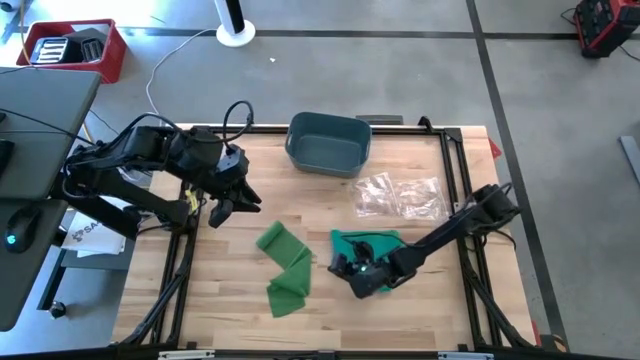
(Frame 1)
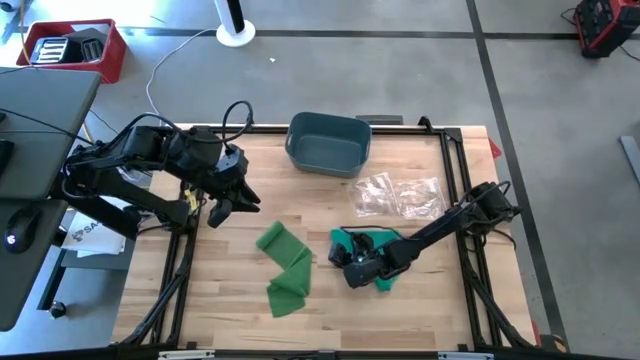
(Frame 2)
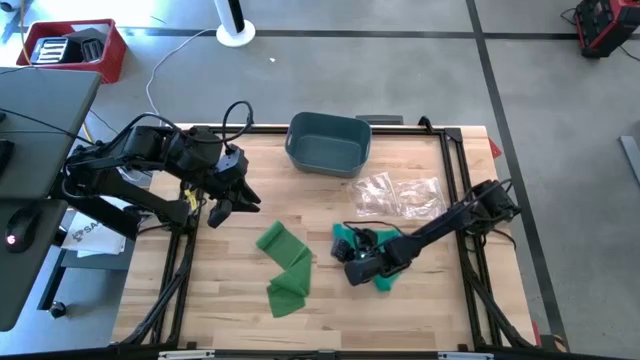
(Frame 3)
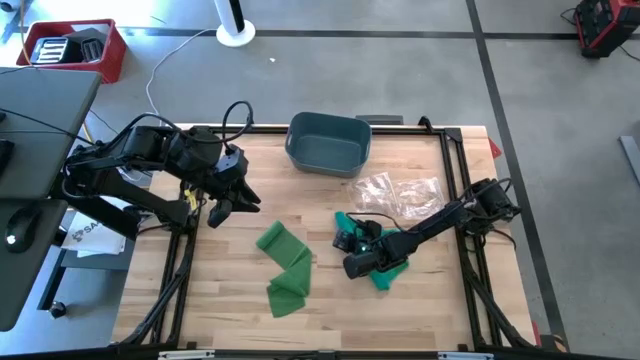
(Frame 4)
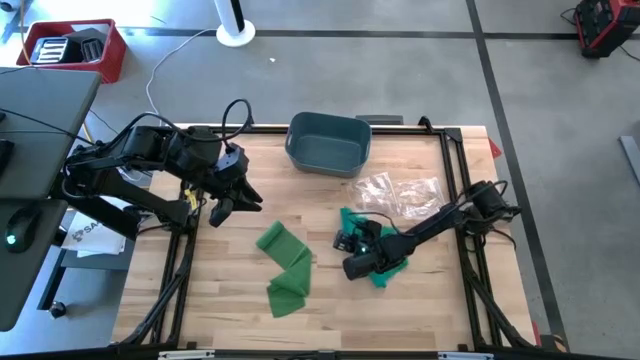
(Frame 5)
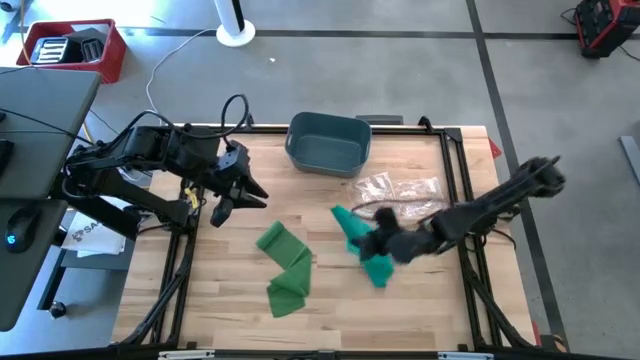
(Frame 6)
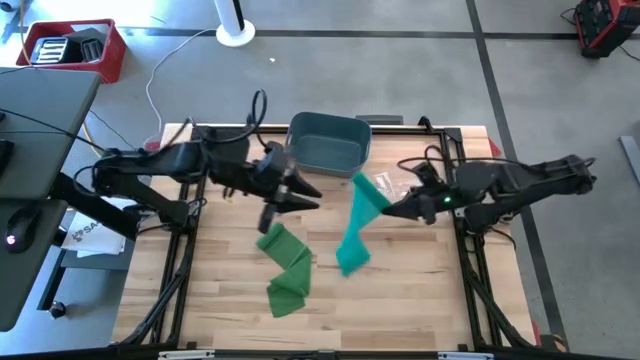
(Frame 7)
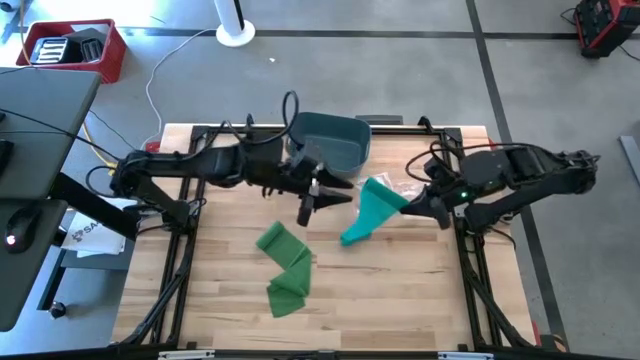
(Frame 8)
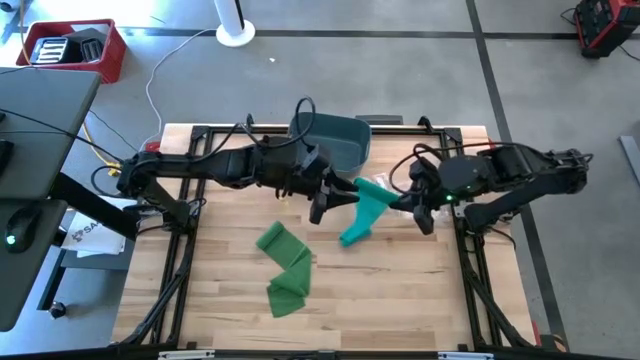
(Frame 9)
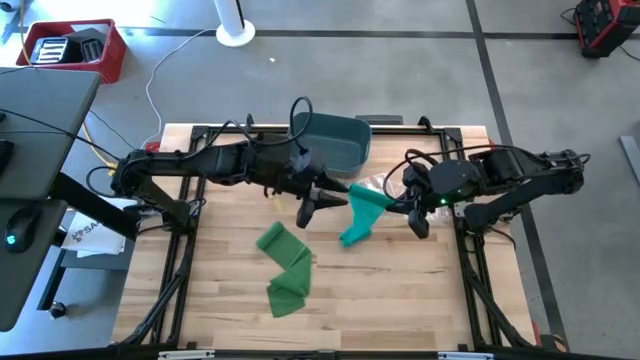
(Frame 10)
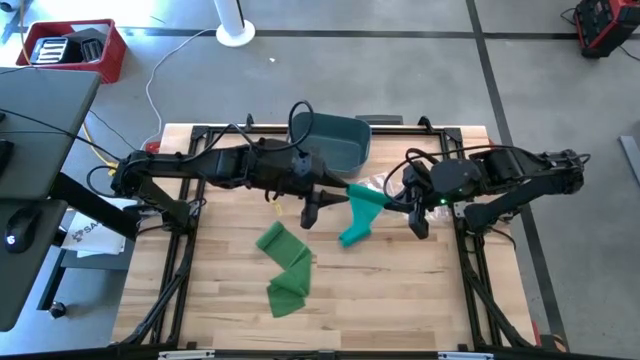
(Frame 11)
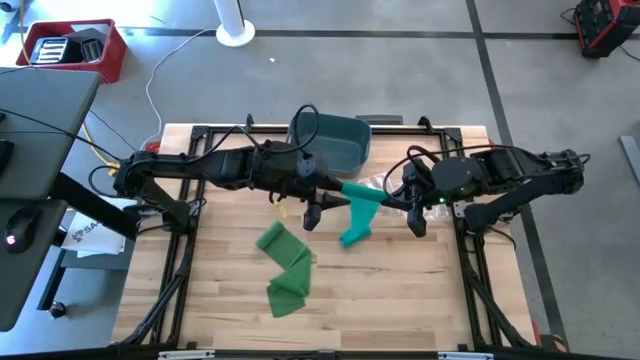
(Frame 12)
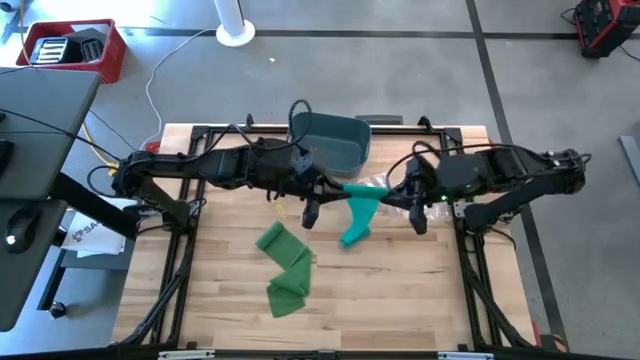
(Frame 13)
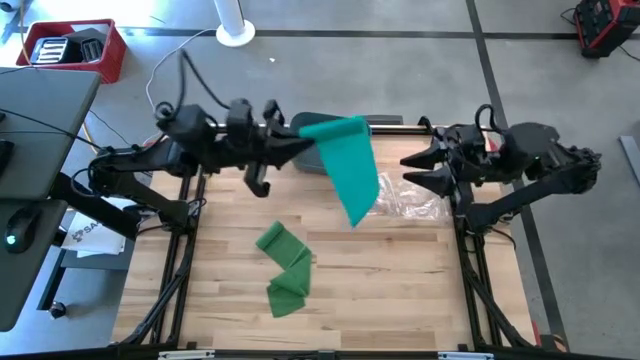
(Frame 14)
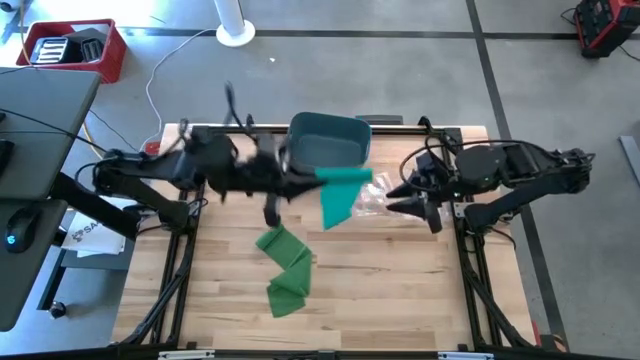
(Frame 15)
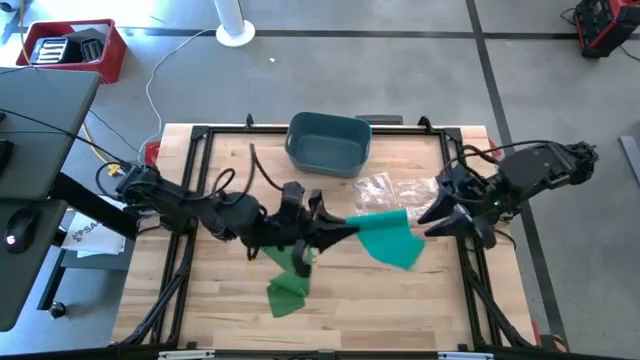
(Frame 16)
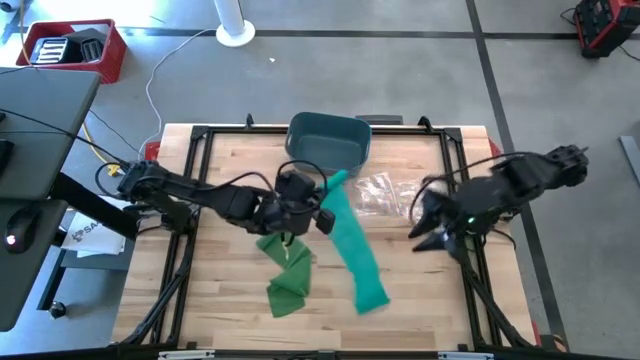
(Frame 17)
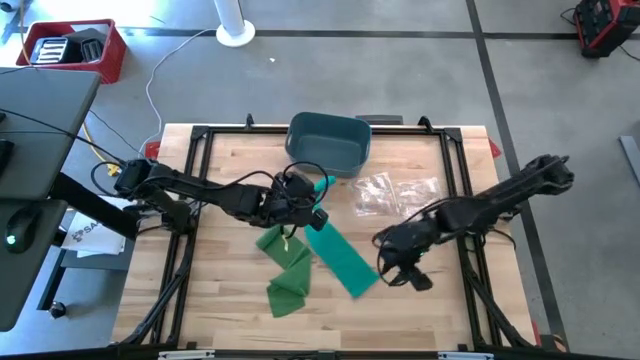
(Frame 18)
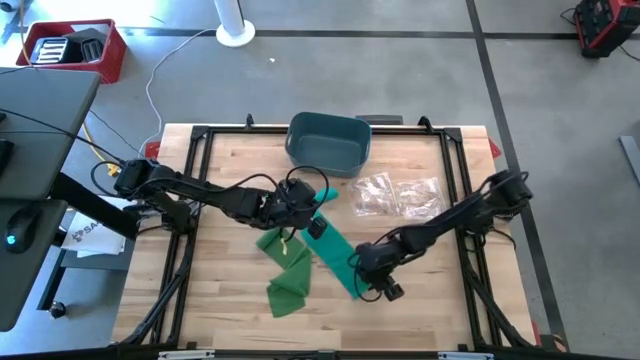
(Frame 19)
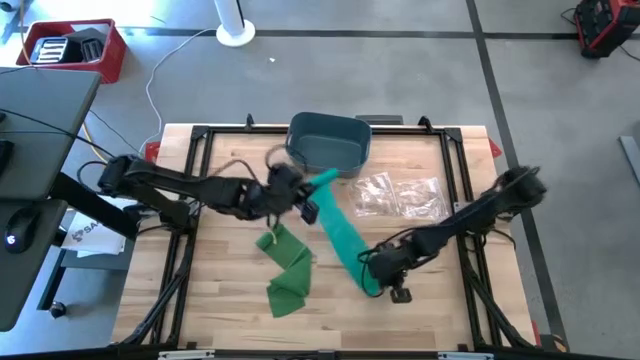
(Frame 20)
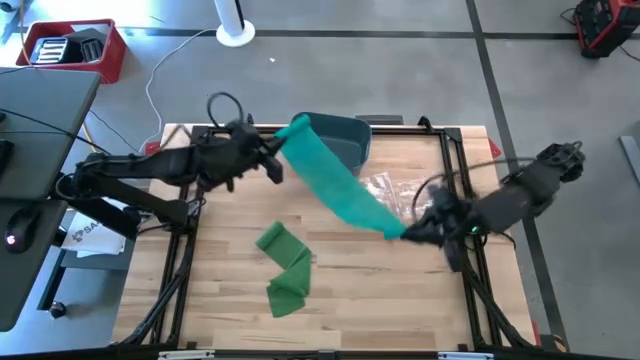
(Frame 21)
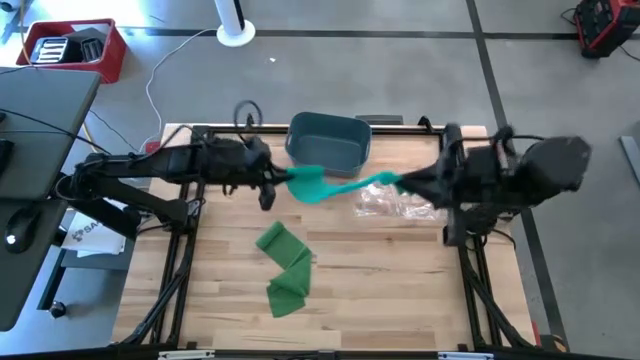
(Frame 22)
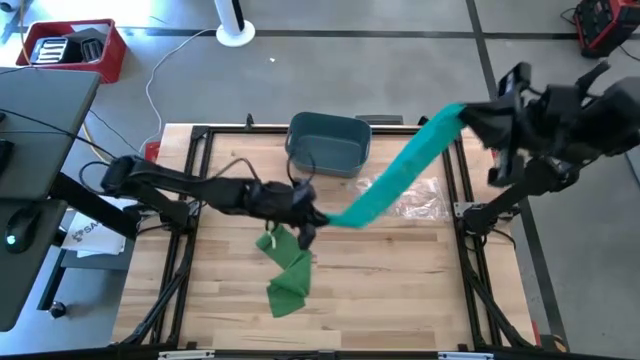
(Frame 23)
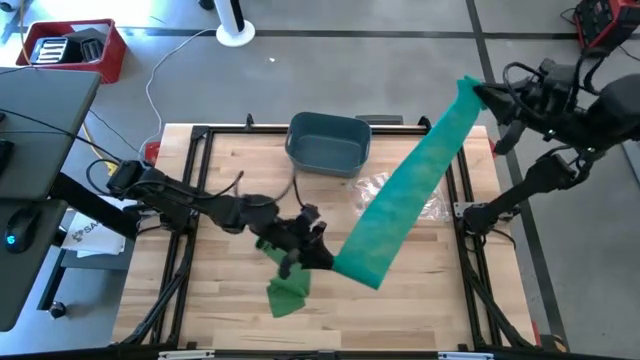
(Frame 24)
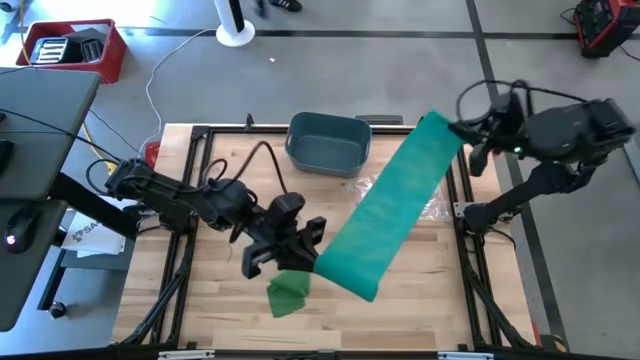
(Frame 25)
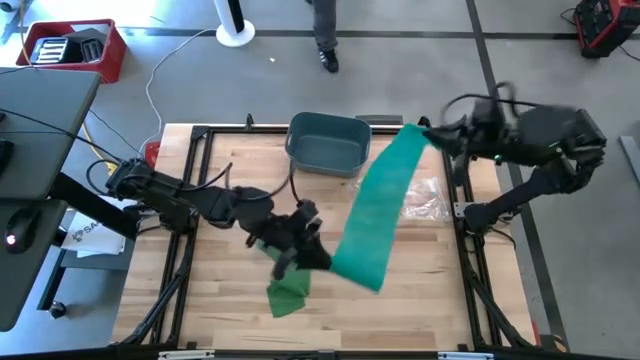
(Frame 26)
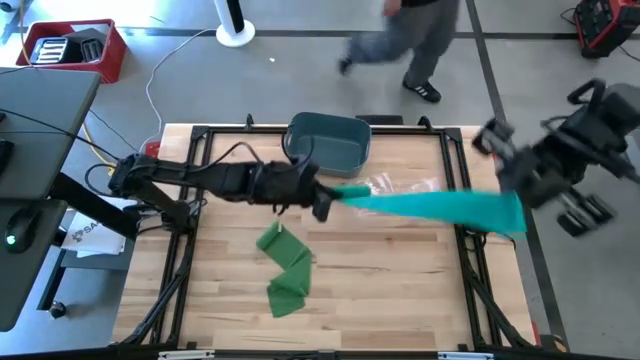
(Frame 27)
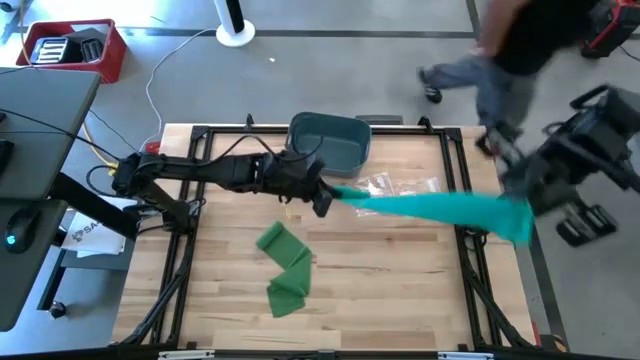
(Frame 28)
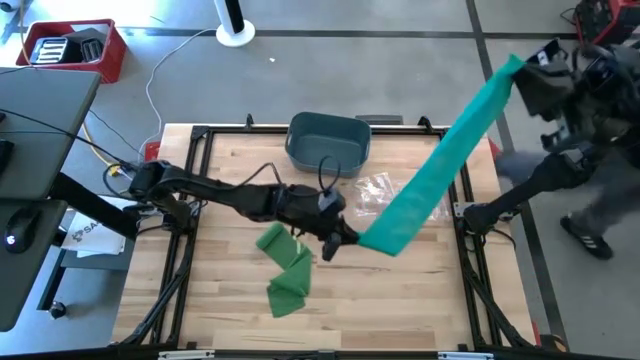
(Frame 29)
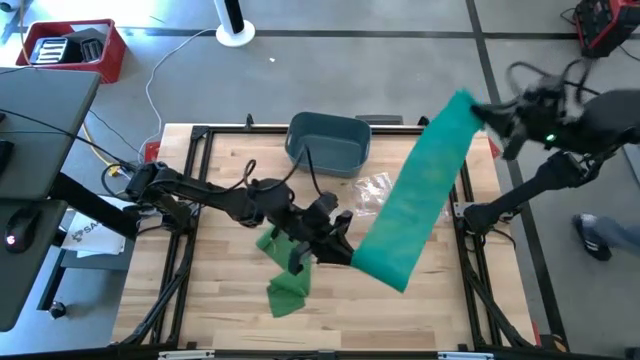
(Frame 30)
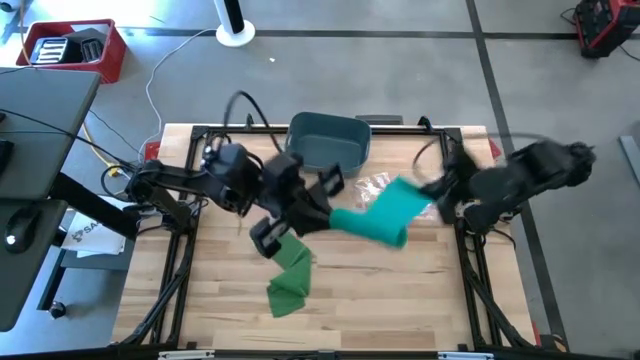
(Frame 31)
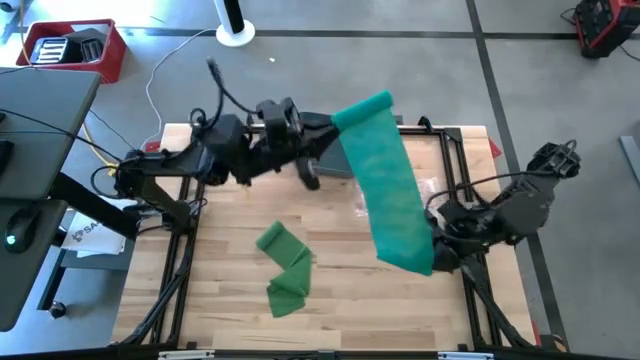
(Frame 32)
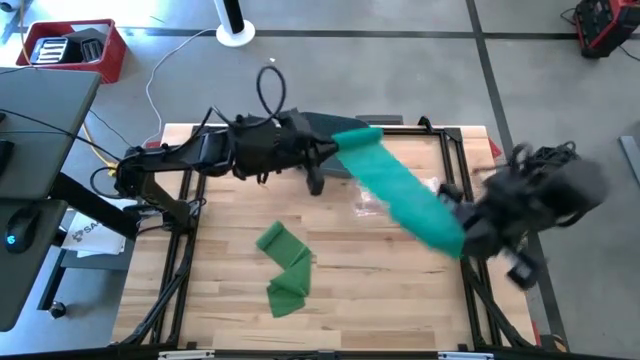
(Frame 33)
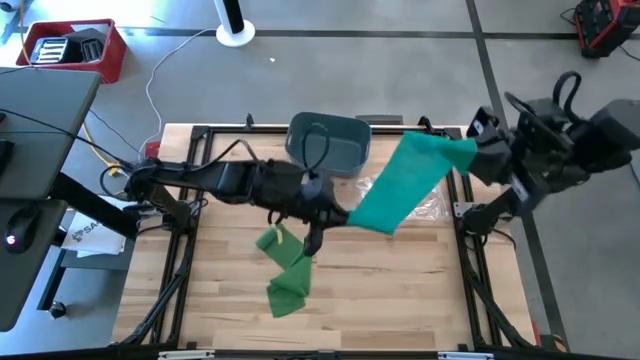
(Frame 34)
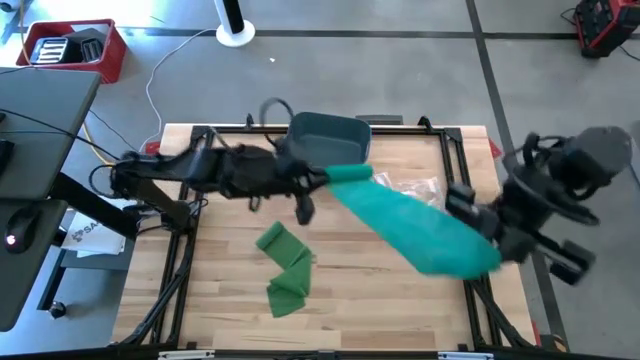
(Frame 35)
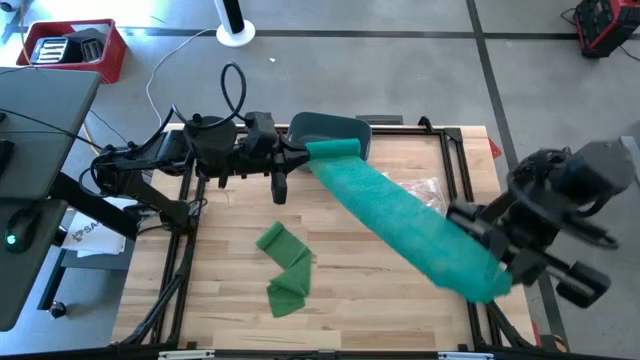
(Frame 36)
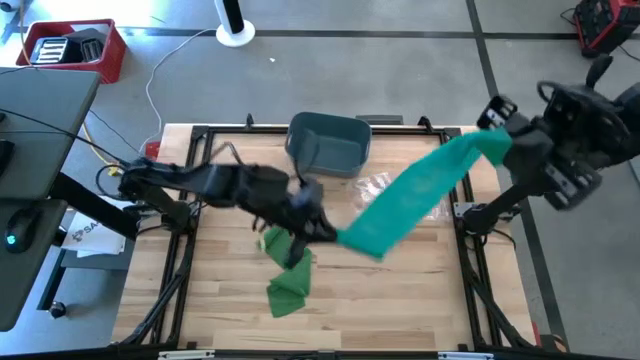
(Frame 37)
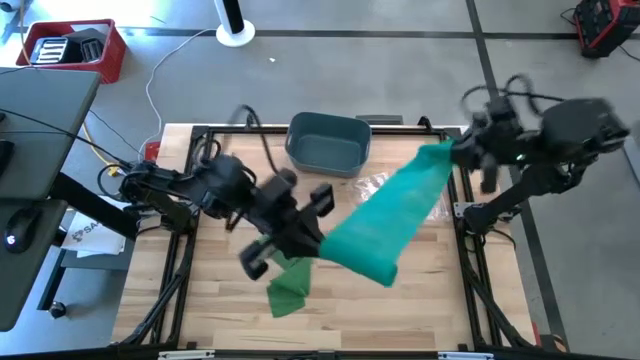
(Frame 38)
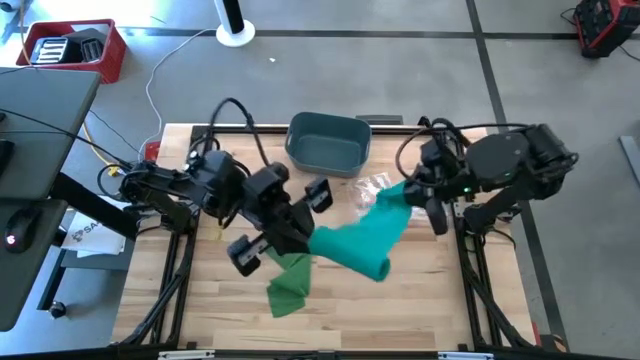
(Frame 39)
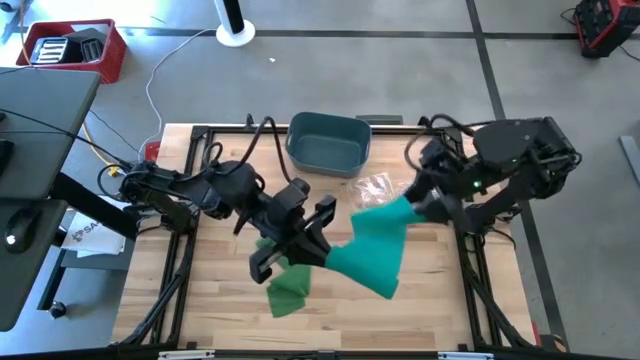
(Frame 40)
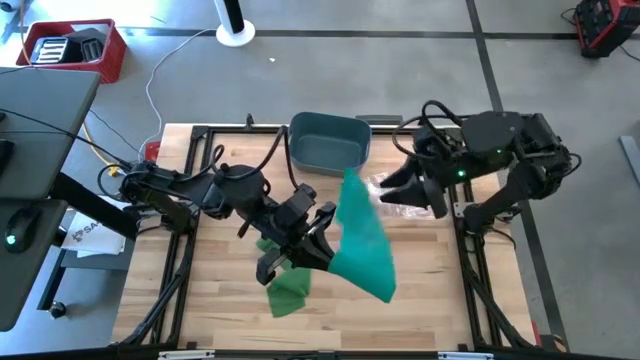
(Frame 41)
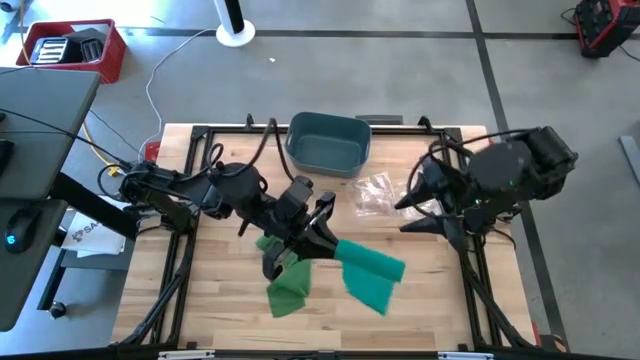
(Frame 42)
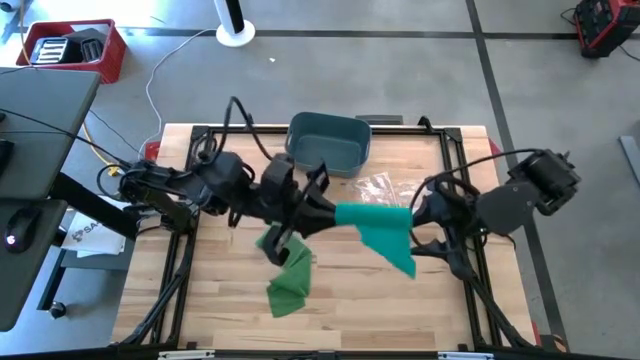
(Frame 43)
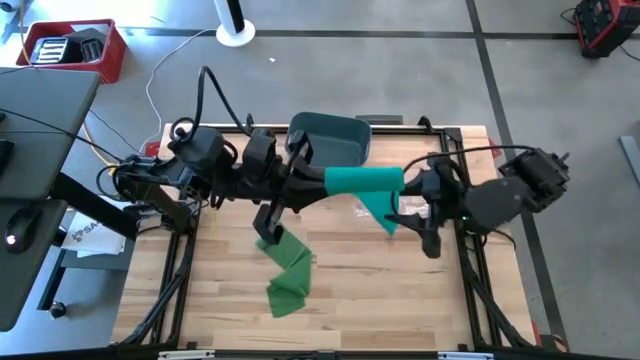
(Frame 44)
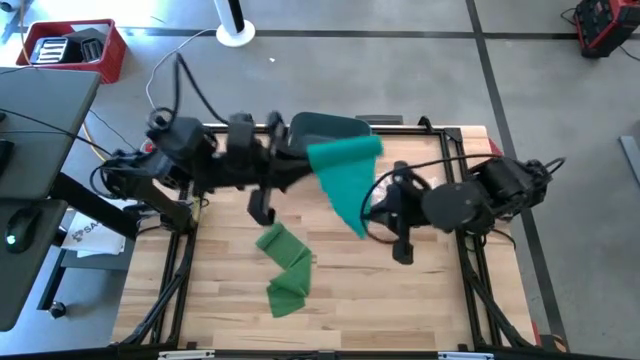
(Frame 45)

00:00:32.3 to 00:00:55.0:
Task: Roll bandage
Roll the blue bandage
